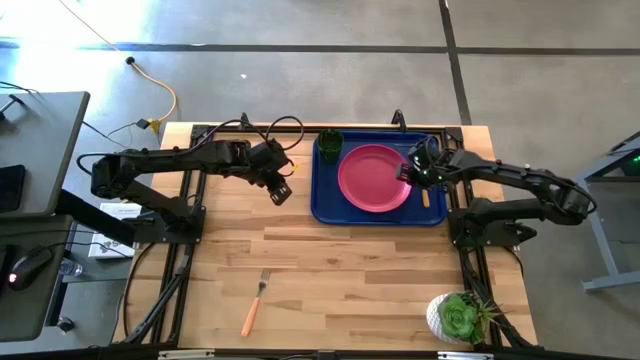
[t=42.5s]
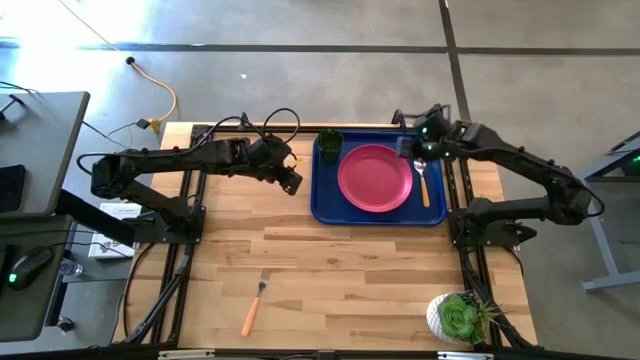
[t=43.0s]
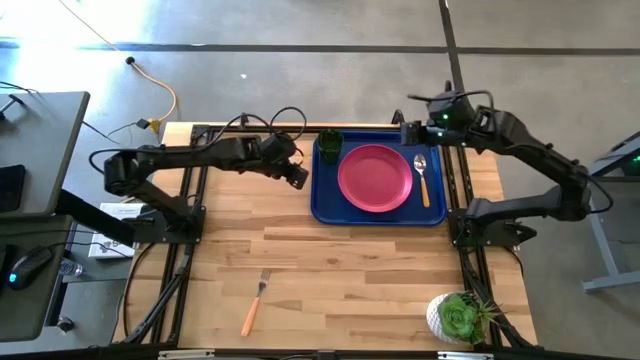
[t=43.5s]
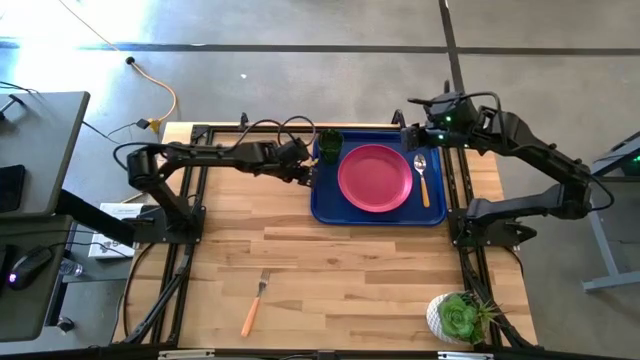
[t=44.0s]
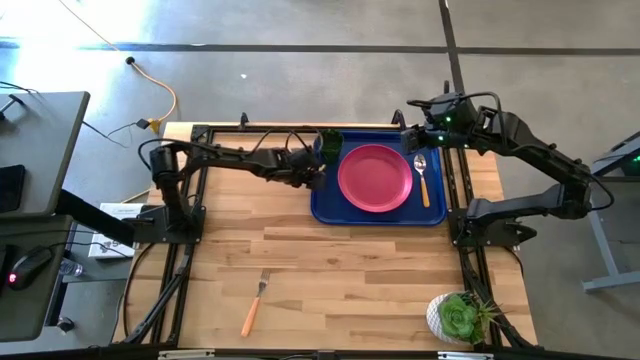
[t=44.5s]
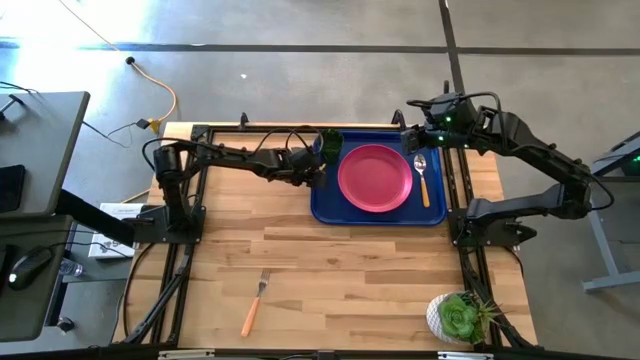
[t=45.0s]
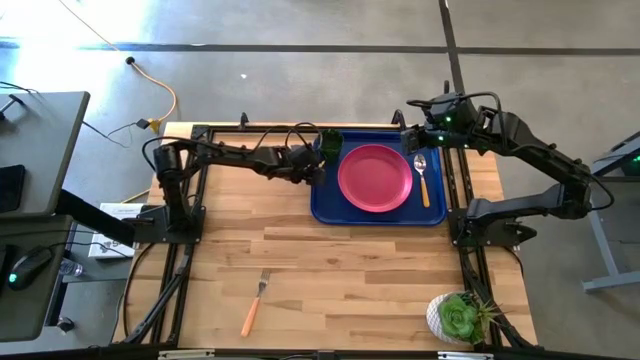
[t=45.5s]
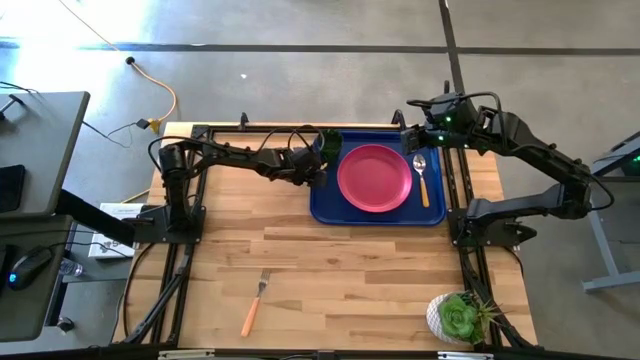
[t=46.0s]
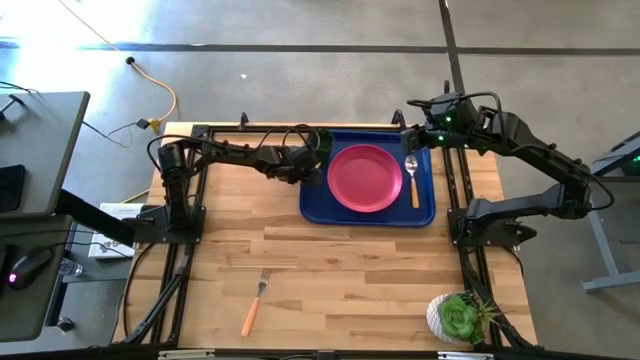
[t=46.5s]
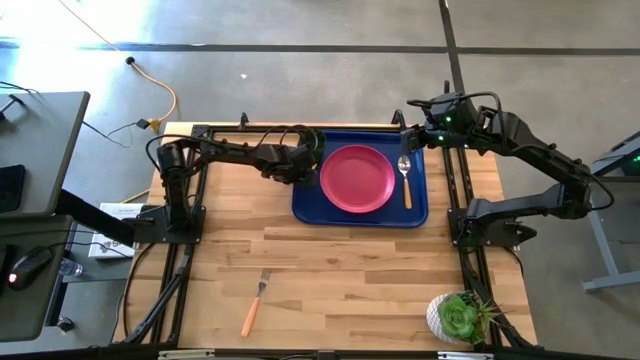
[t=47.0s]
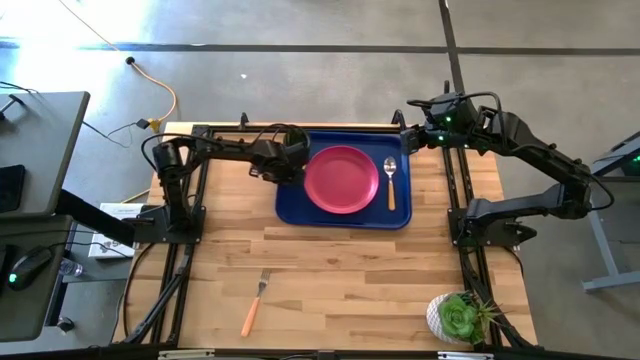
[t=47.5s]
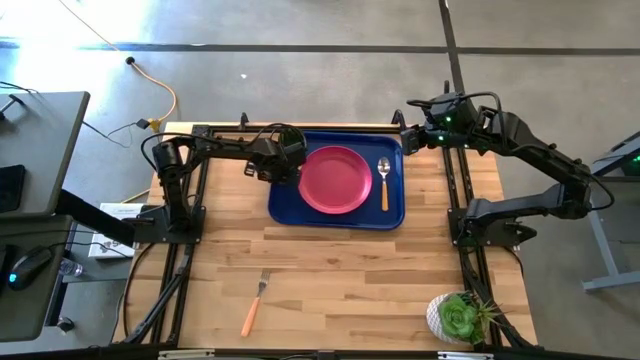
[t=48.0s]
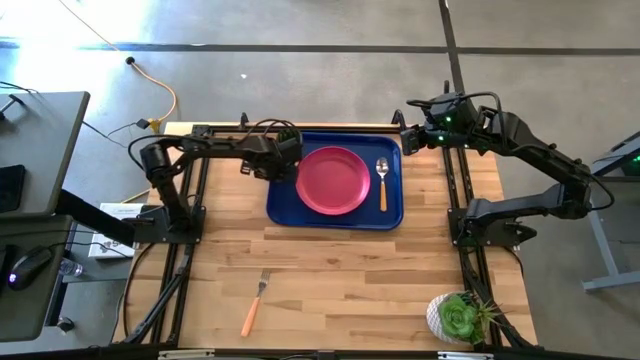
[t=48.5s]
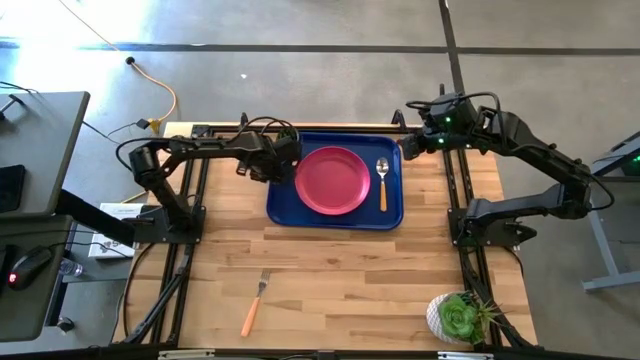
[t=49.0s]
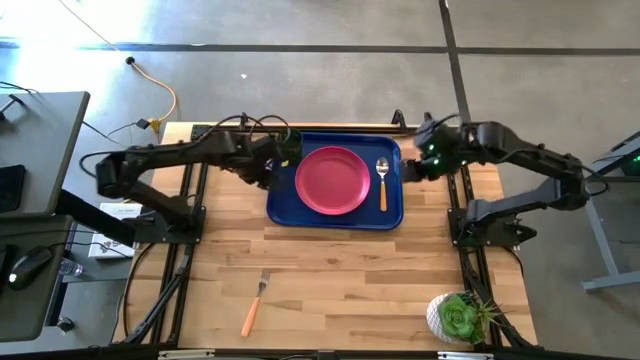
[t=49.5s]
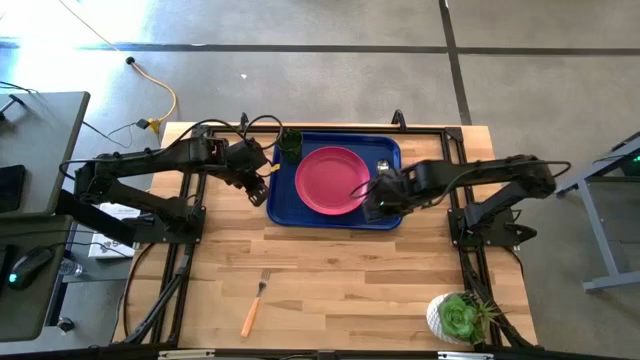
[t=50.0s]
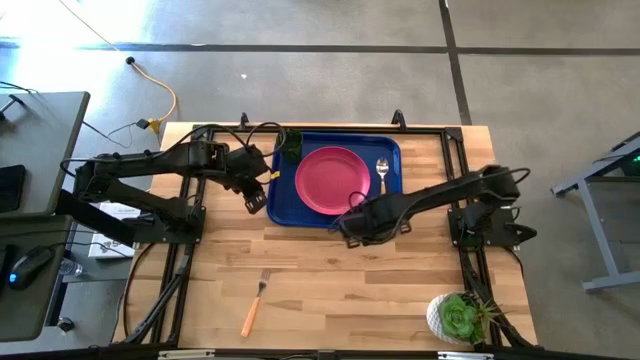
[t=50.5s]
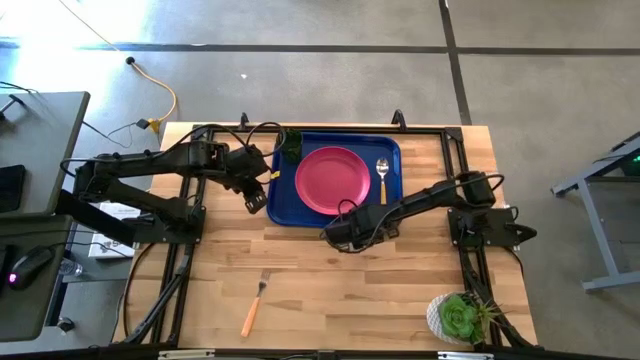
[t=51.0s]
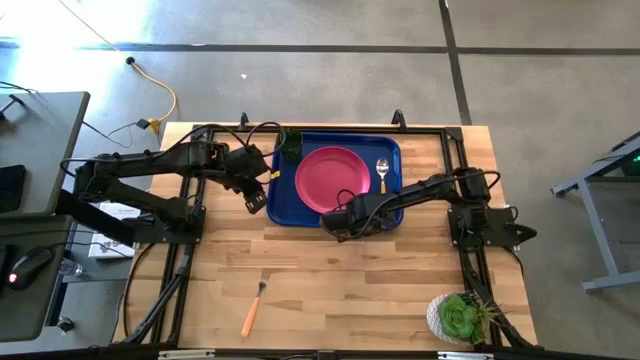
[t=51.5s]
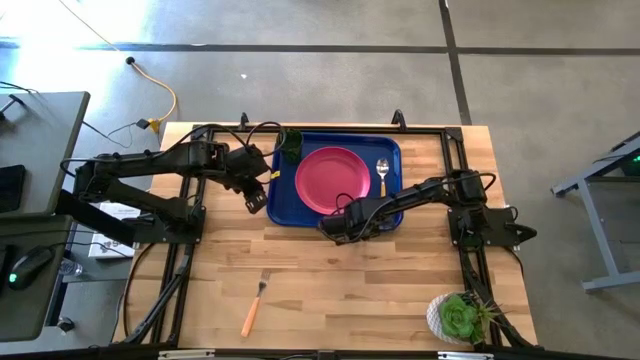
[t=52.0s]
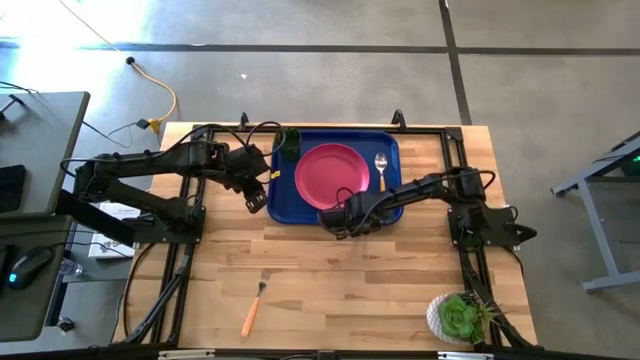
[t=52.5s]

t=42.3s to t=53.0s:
Task: Pick and place plate/cup/fork/spoon on tray
Move the blue tray to the middle of the table

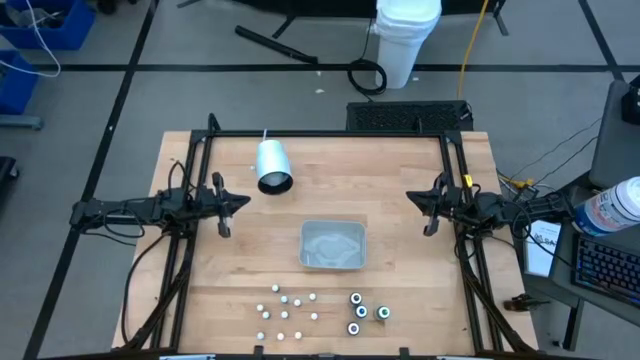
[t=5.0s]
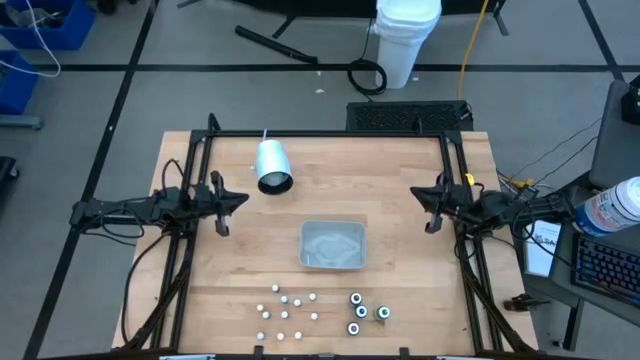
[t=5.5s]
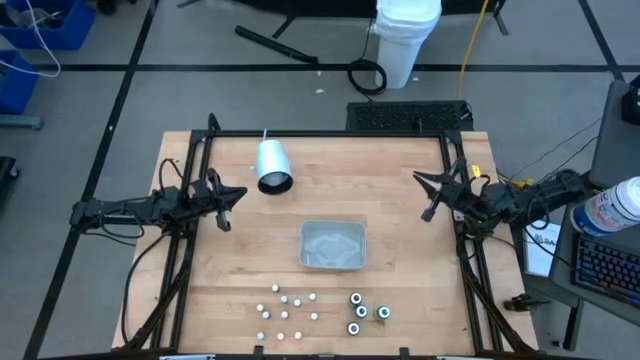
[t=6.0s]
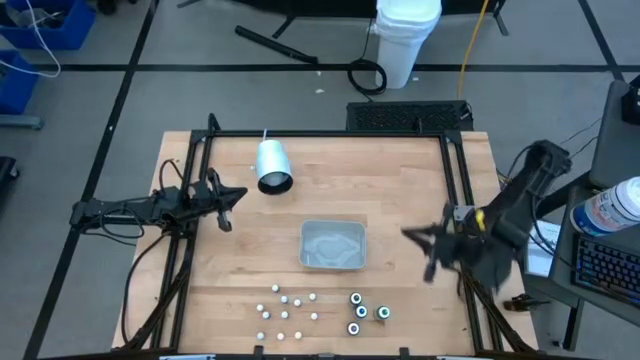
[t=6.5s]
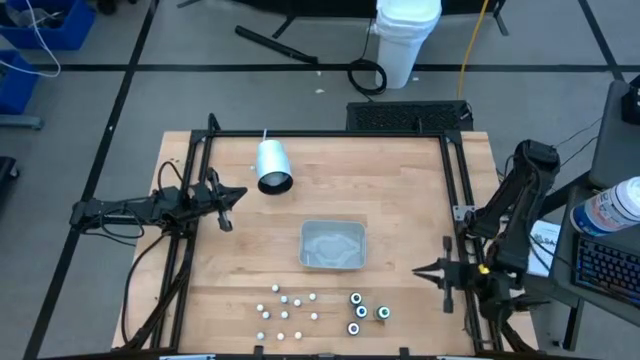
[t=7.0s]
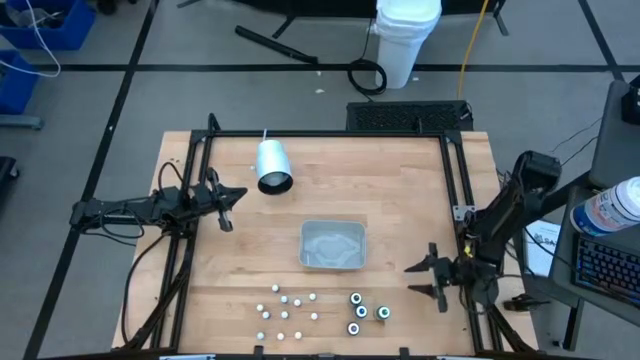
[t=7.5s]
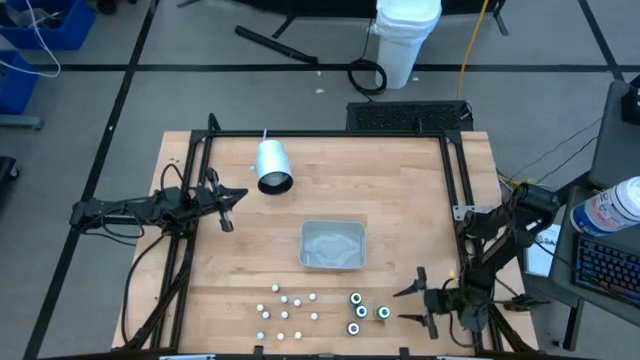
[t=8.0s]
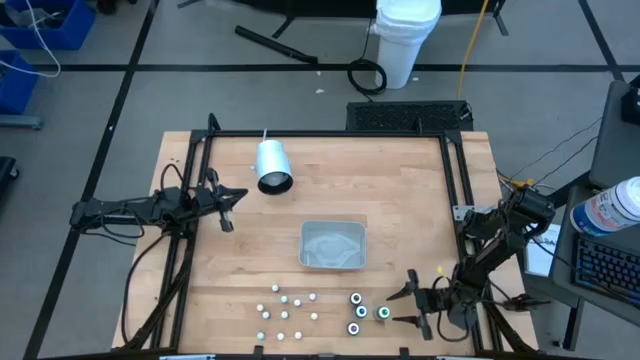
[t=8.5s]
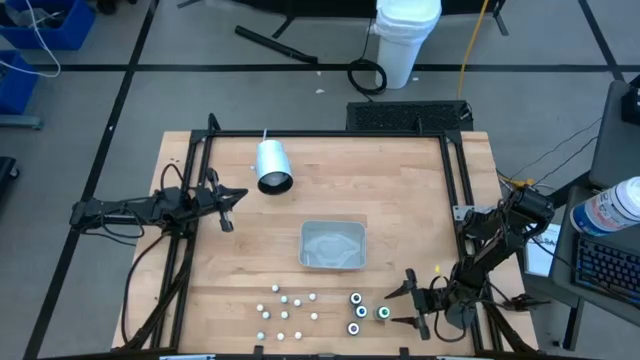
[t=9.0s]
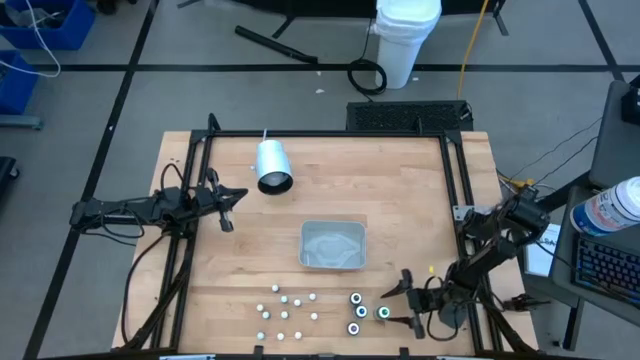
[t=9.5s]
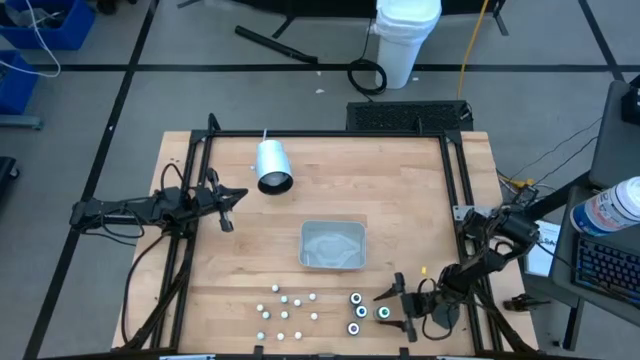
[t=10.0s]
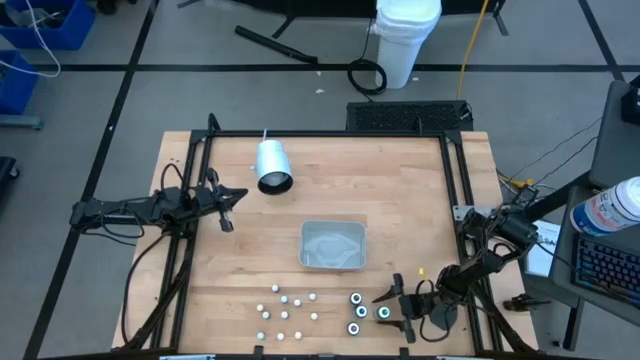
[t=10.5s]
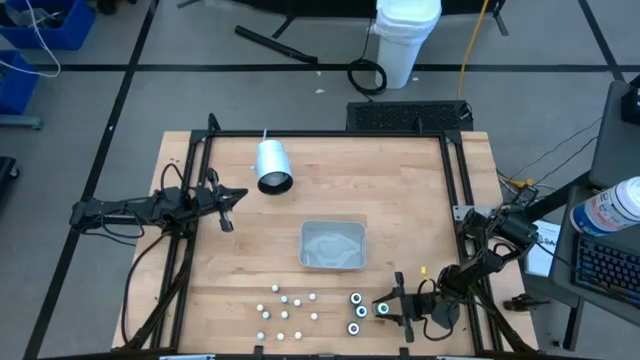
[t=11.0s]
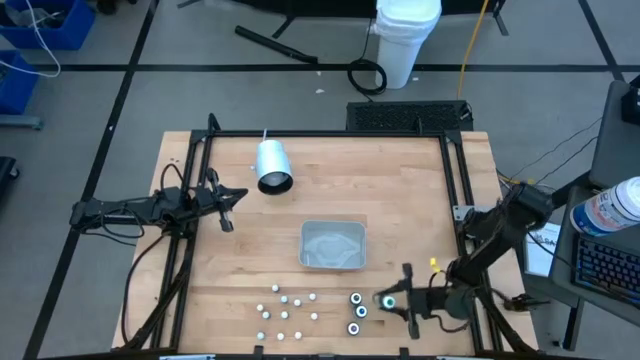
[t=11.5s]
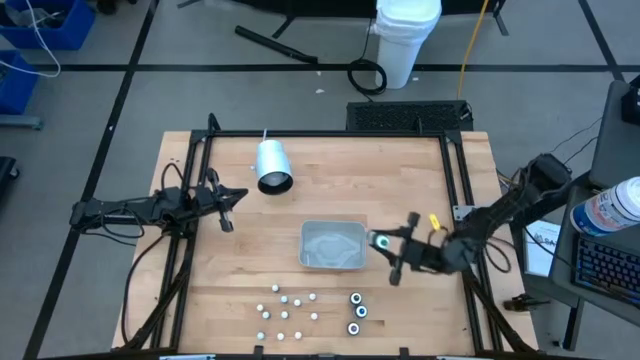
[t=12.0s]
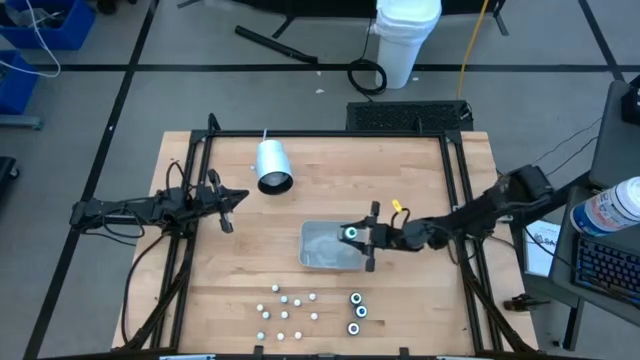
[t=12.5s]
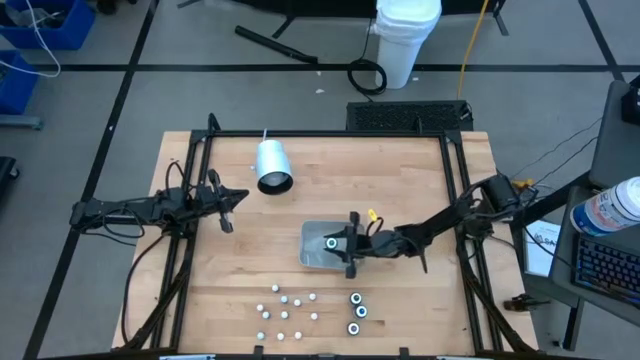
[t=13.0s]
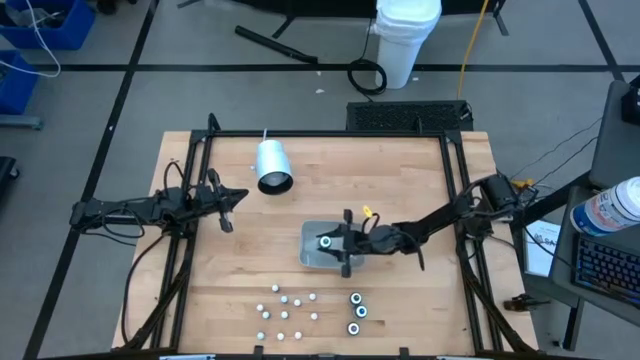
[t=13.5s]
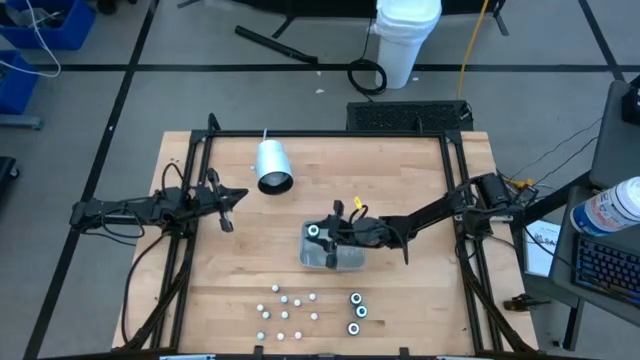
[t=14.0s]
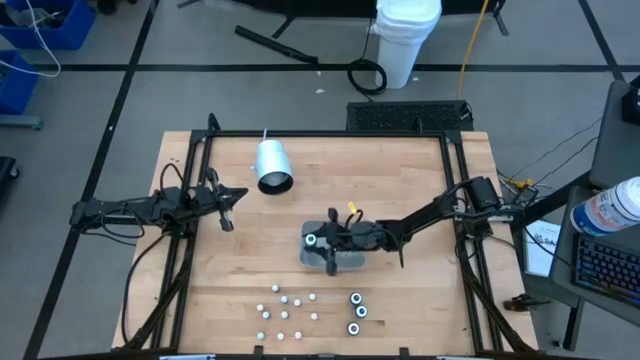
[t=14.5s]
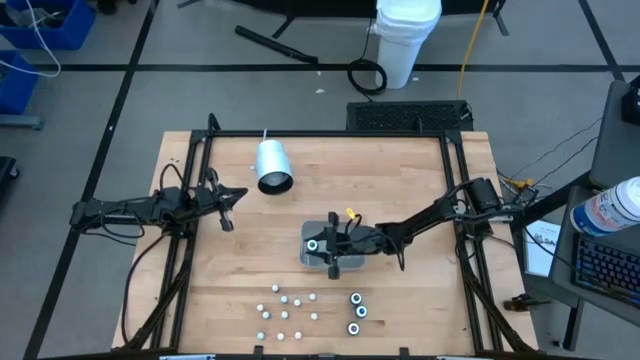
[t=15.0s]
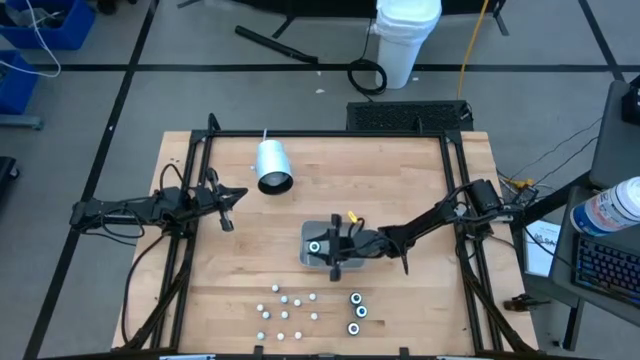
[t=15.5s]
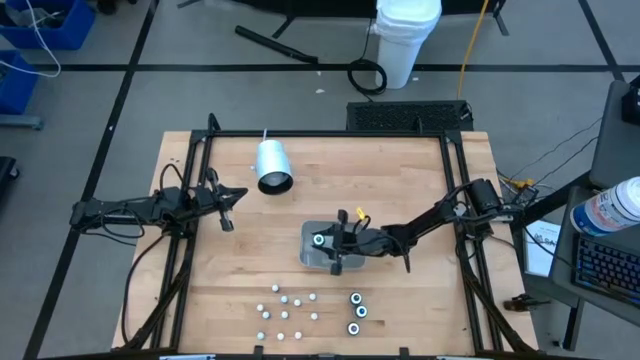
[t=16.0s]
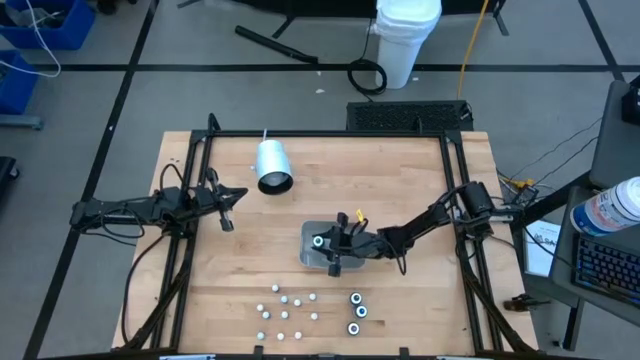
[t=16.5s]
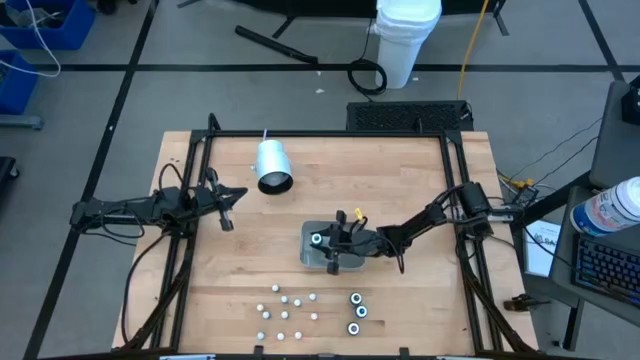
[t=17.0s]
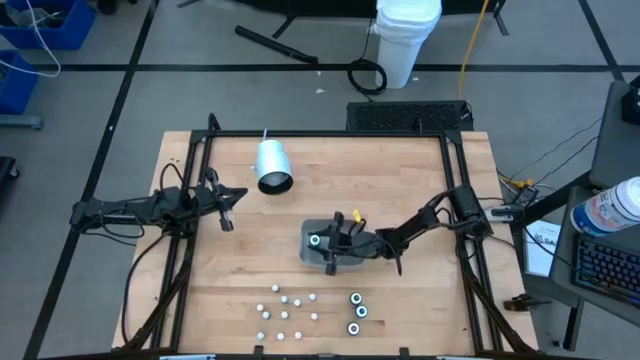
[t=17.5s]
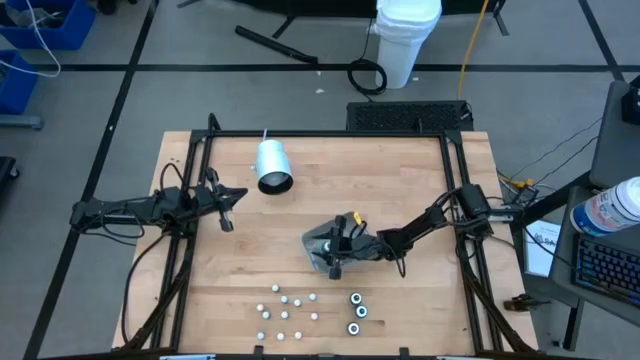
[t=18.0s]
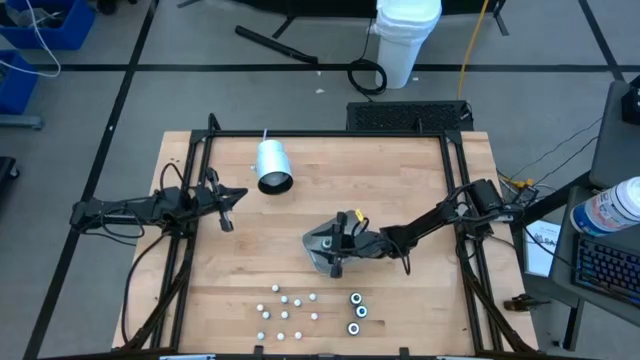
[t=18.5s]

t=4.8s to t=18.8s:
Task: Pick & Place food coloring
Put the large green food coloring bottle into the white bin
